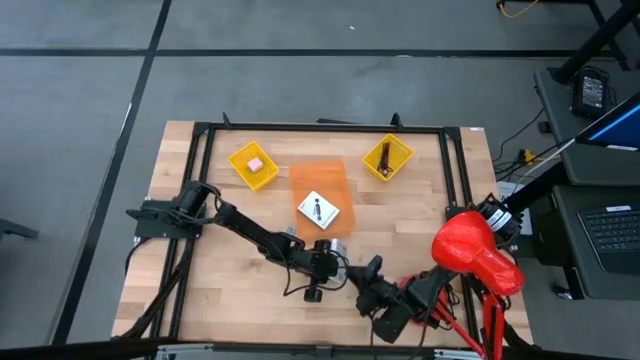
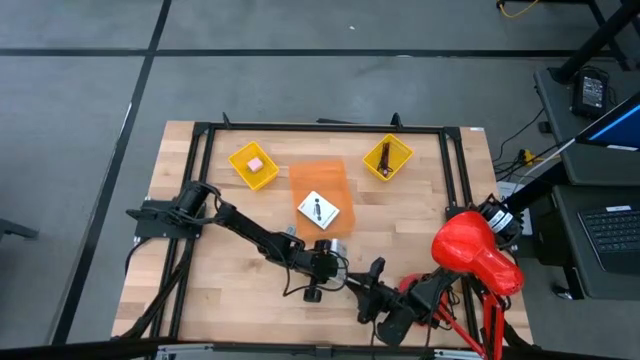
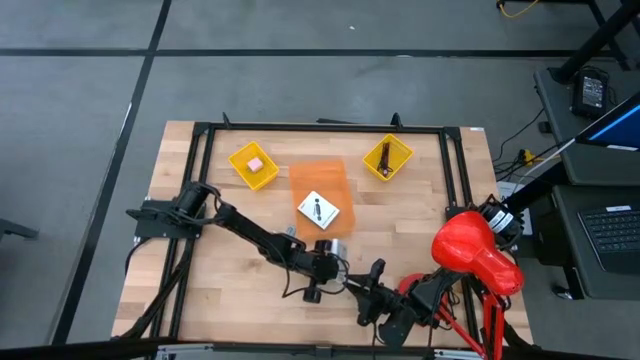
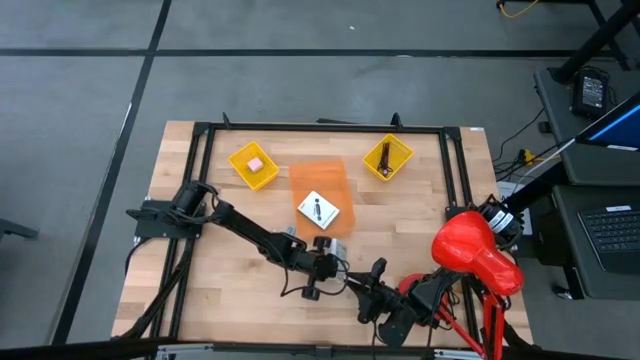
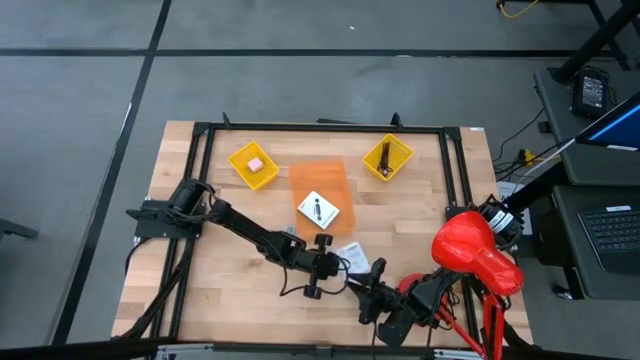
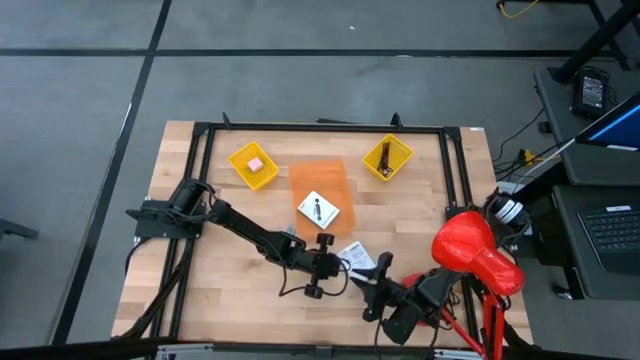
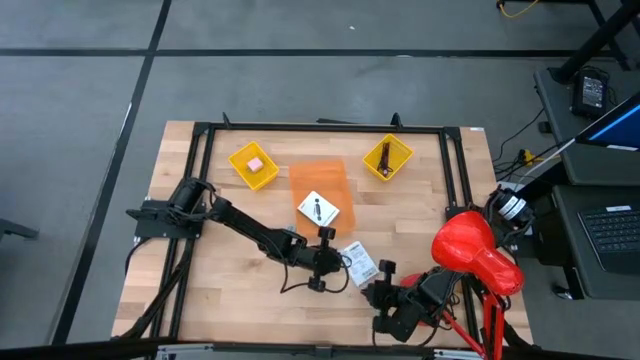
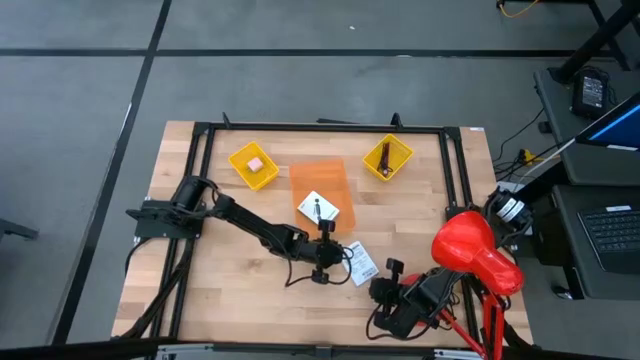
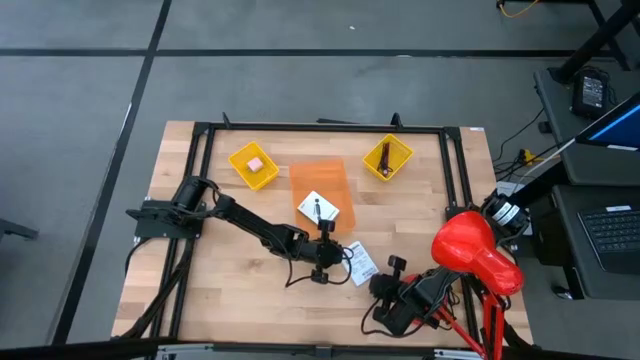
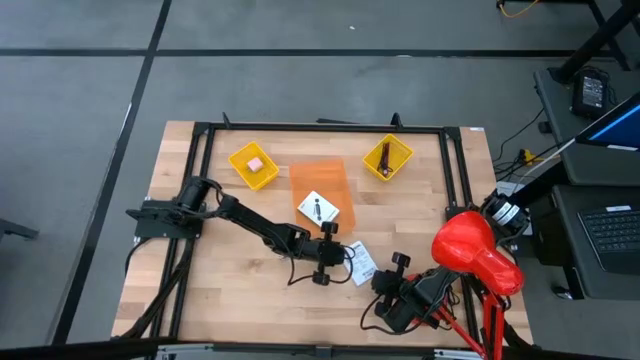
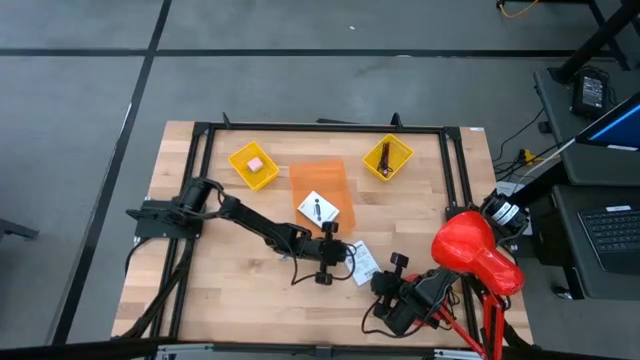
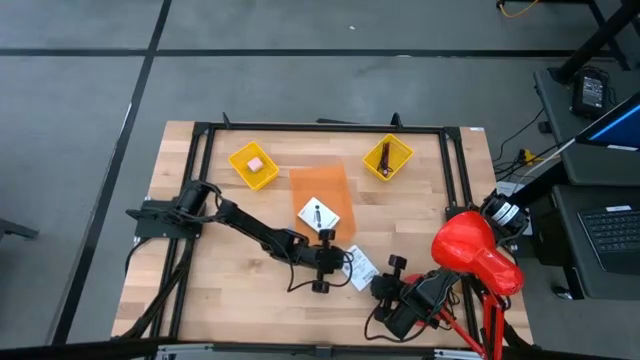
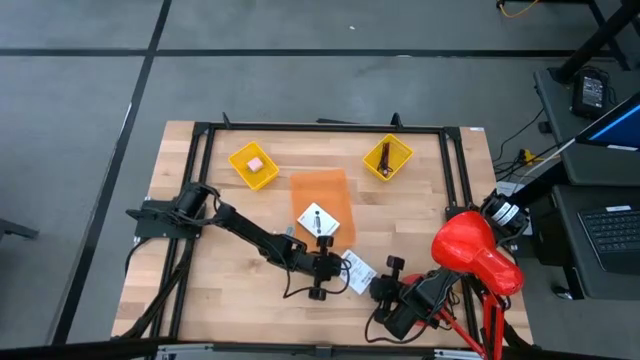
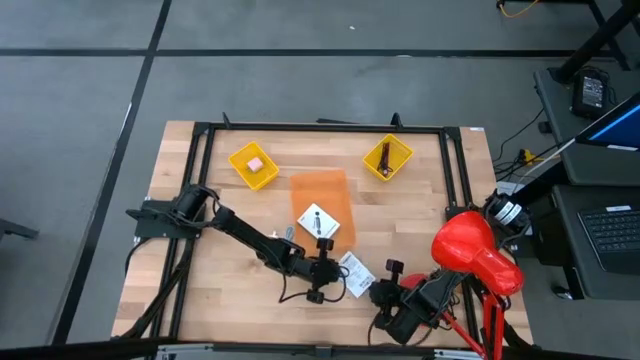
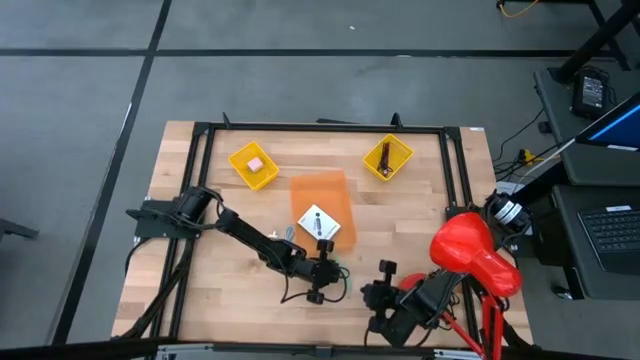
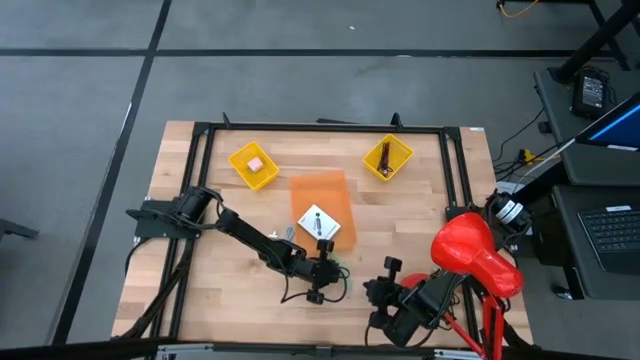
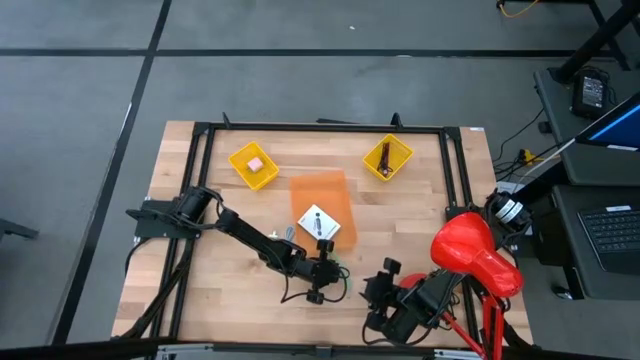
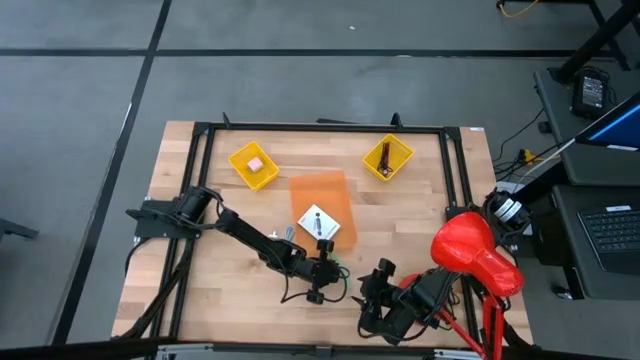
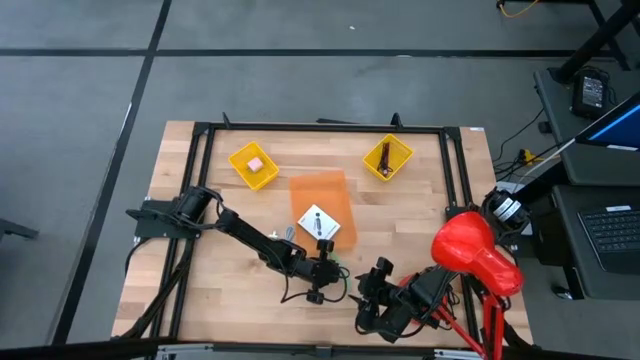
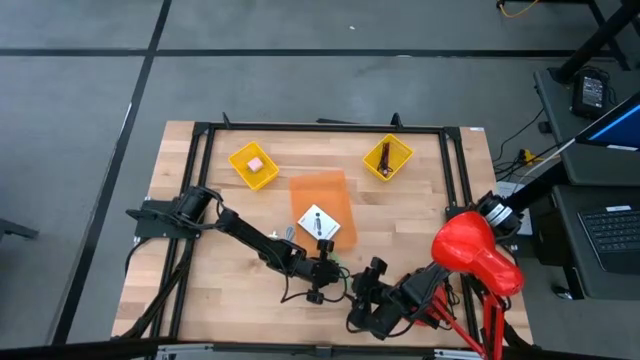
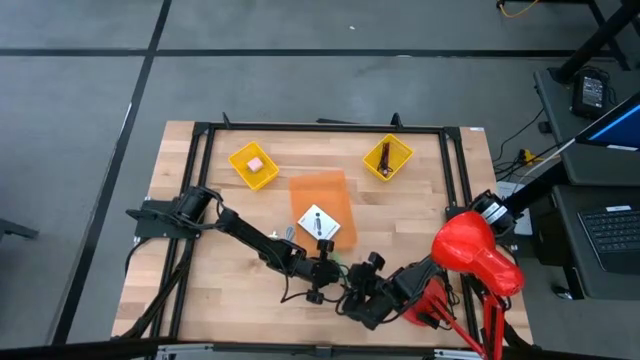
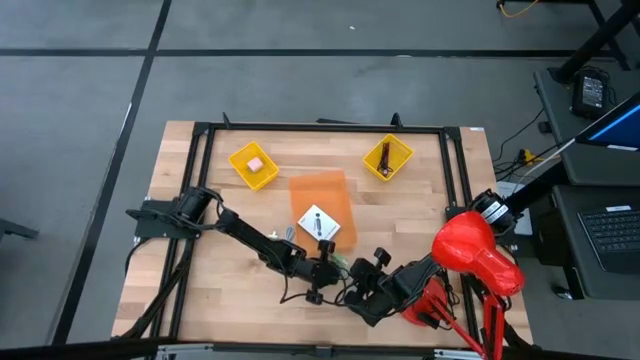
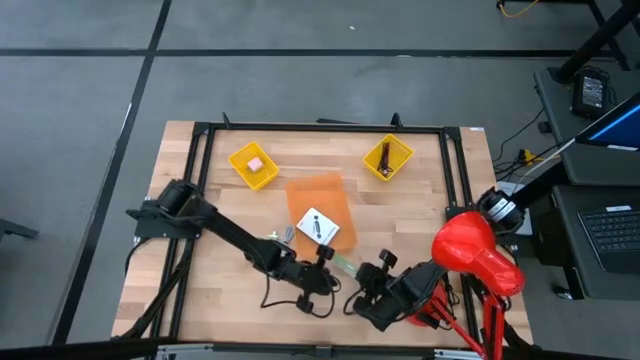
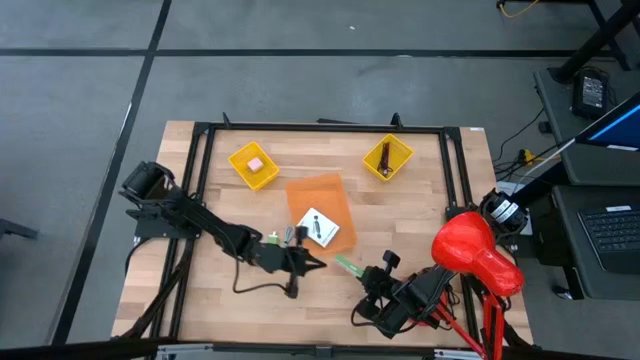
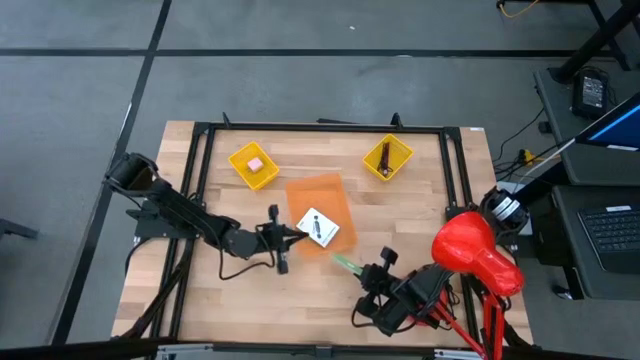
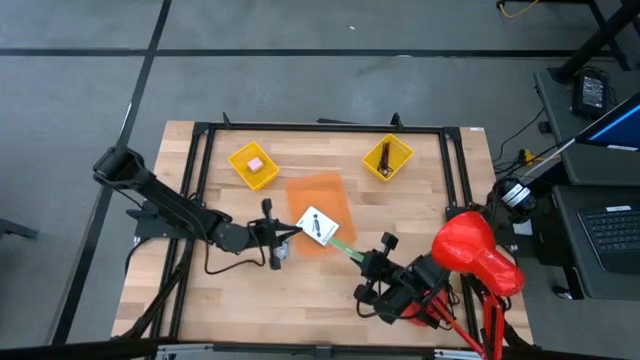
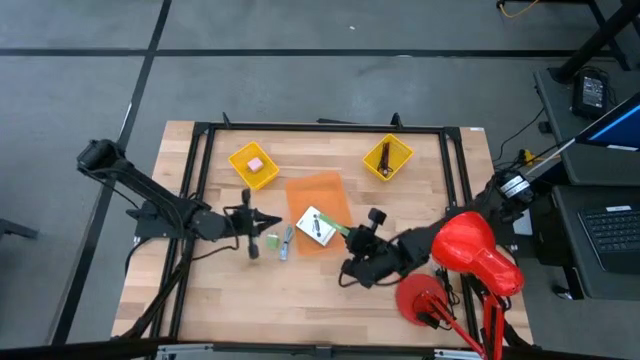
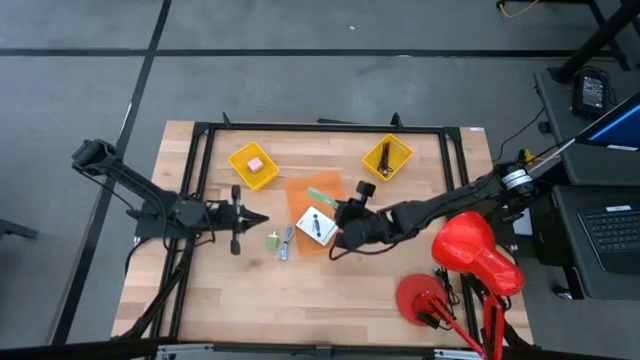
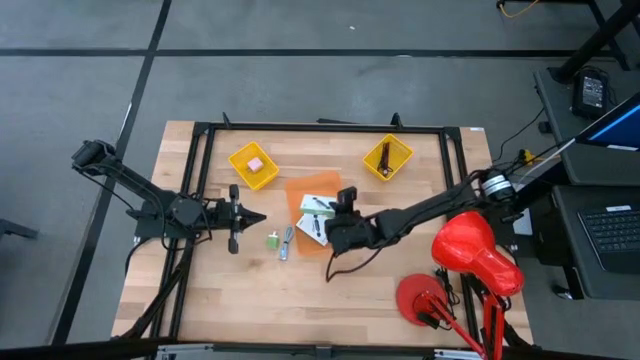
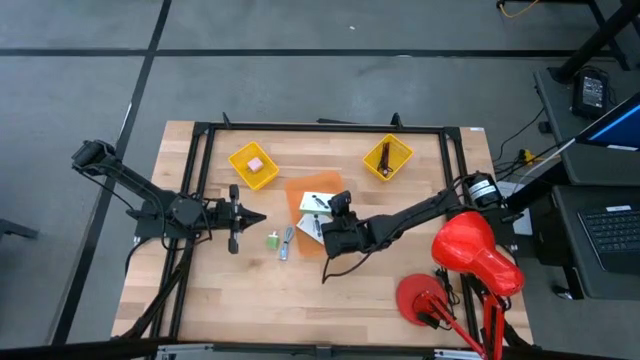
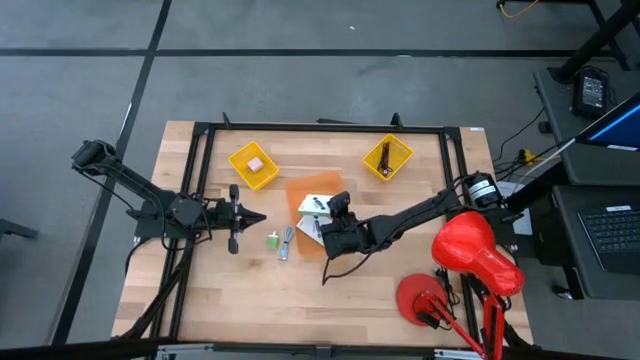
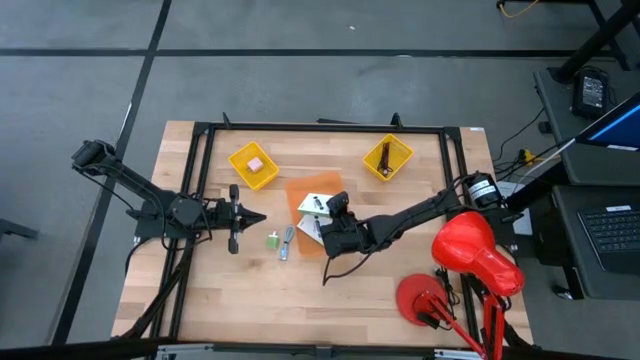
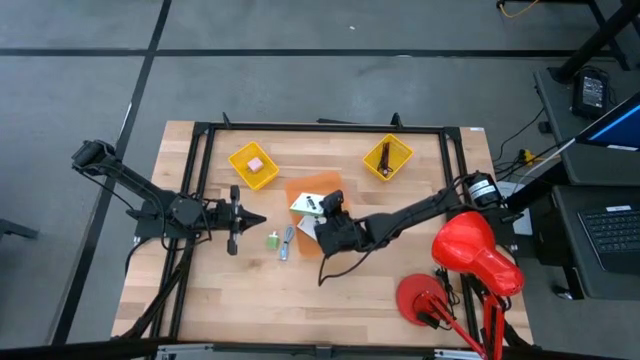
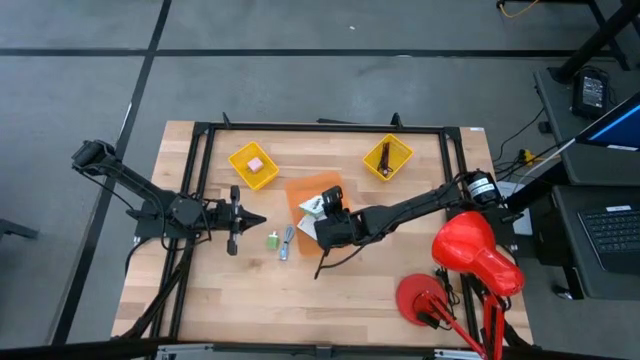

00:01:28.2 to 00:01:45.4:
Task: Pick and place items into bin
Put the card reader box into the orange bin

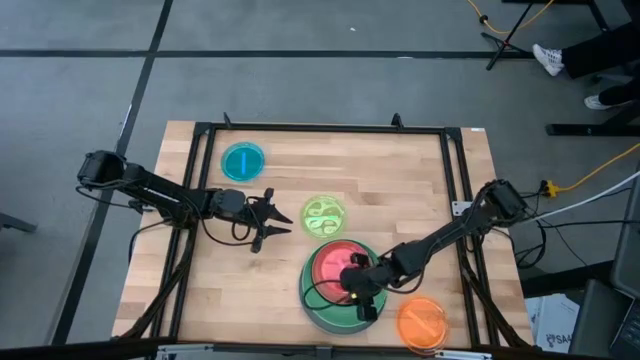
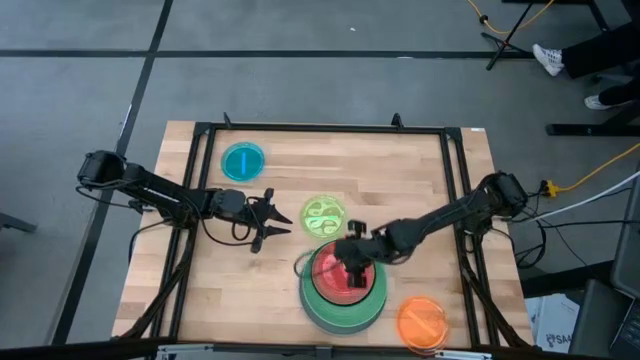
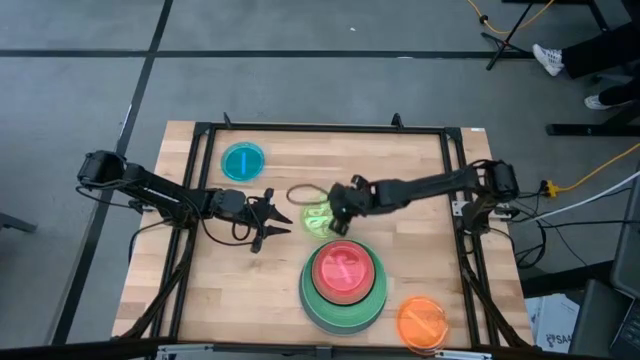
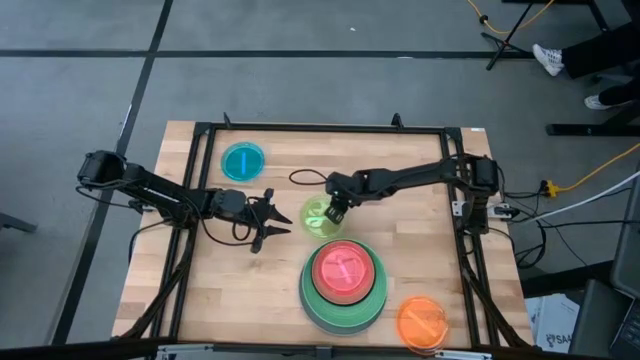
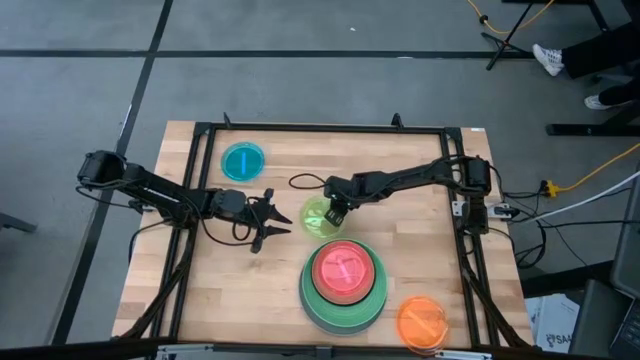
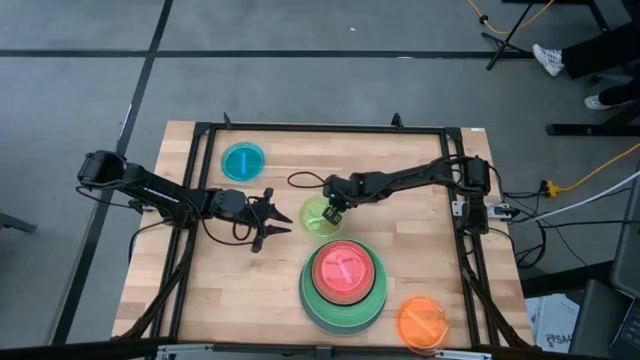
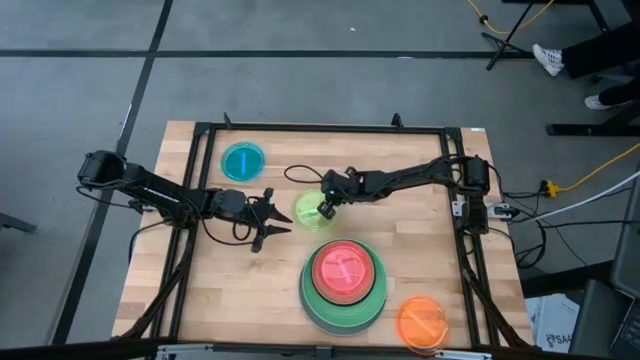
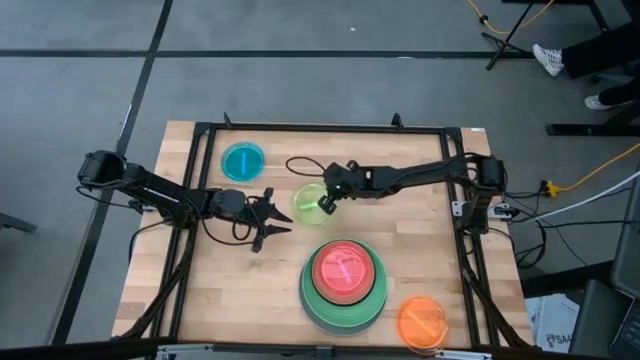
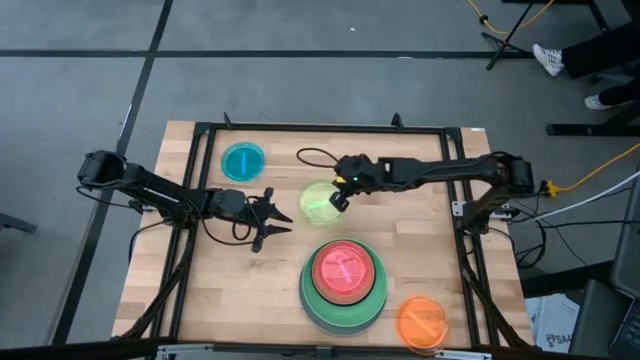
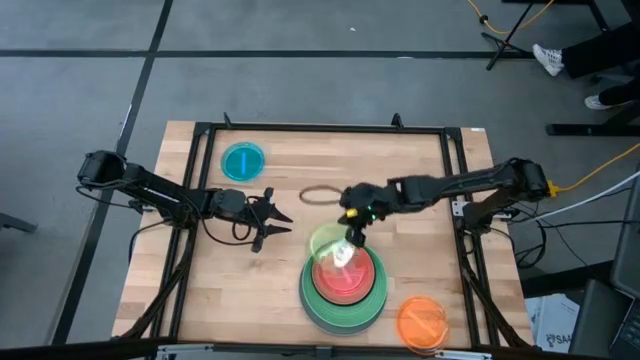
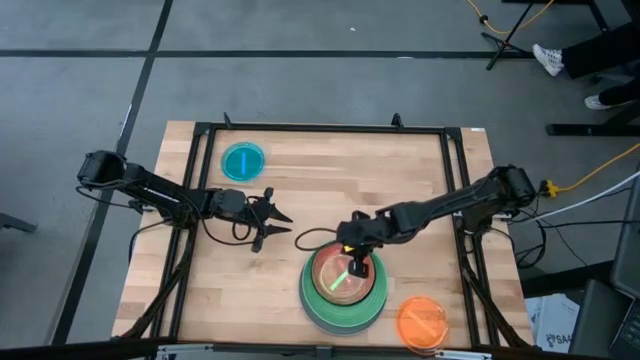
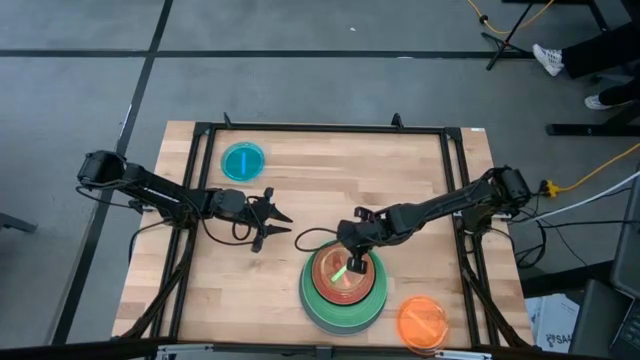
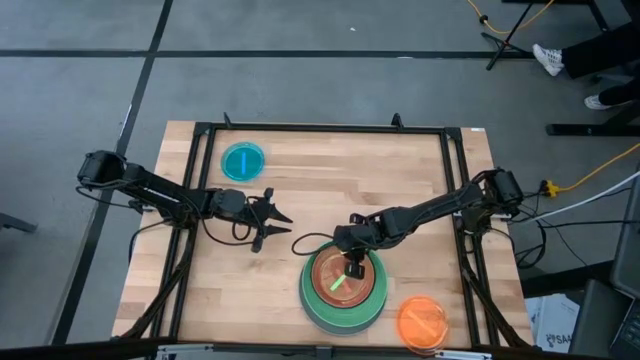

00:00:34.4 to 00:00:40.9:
Task: Stack plastic plates
Stack the green plate on top of the pink plate
